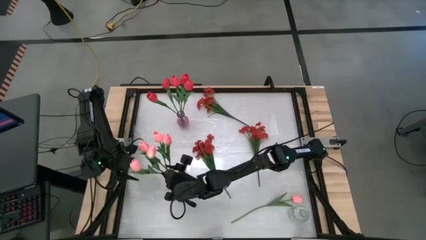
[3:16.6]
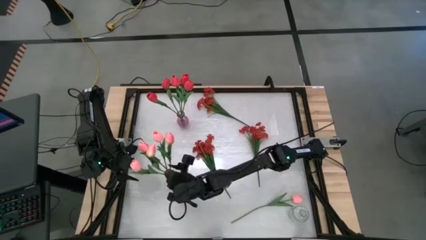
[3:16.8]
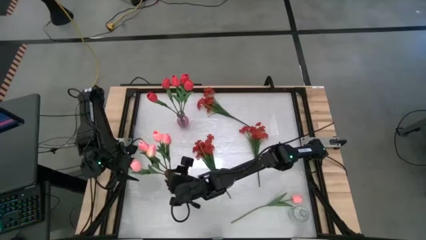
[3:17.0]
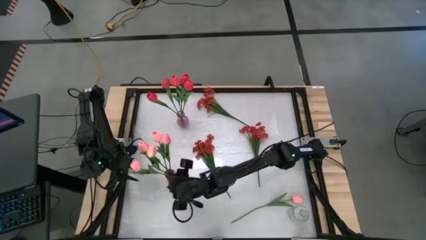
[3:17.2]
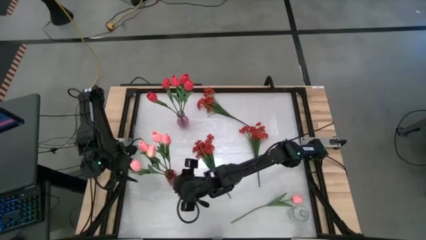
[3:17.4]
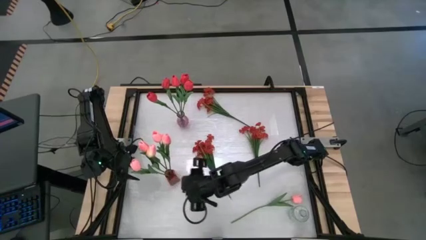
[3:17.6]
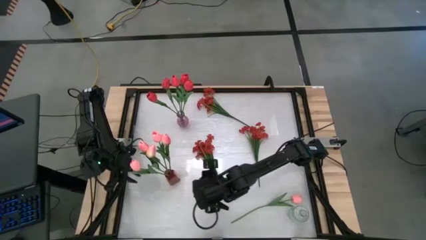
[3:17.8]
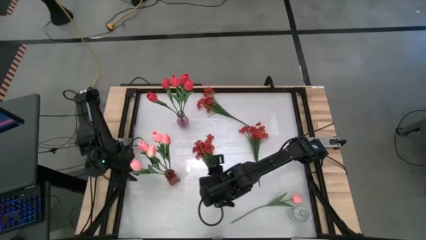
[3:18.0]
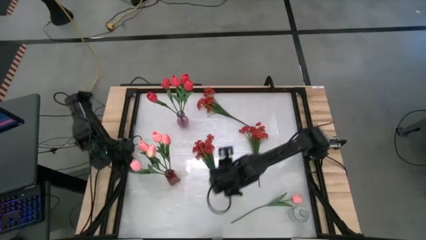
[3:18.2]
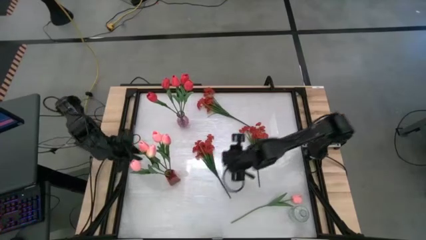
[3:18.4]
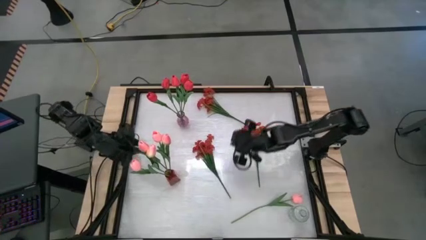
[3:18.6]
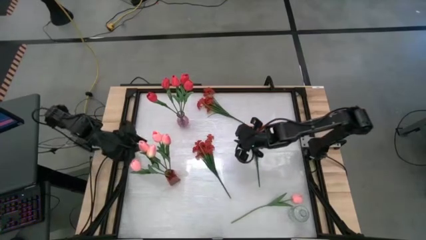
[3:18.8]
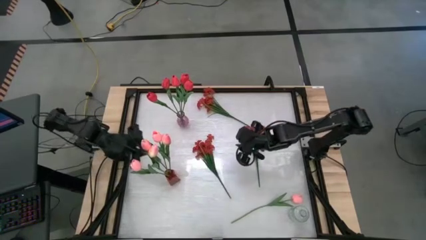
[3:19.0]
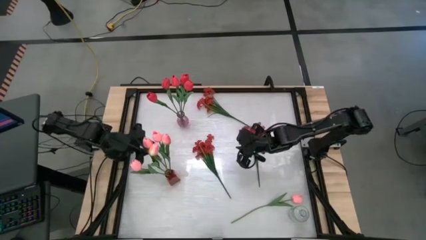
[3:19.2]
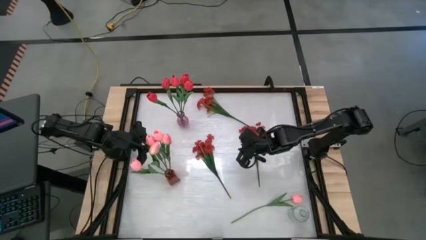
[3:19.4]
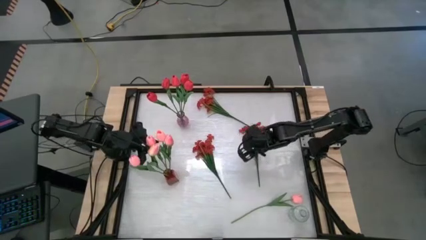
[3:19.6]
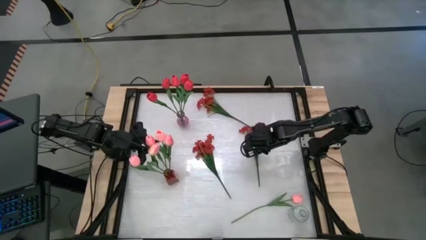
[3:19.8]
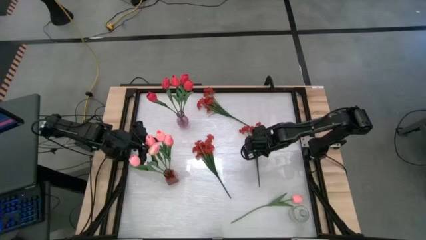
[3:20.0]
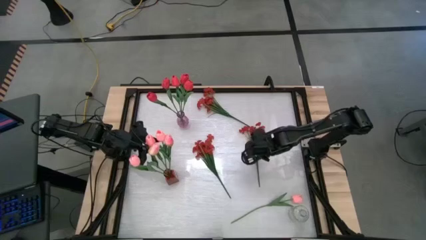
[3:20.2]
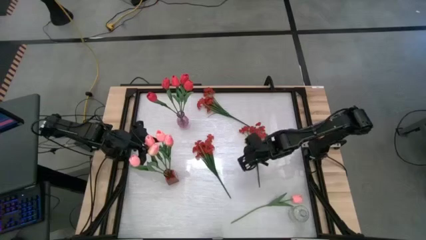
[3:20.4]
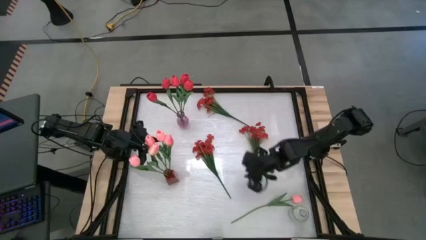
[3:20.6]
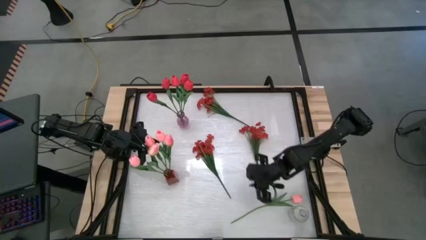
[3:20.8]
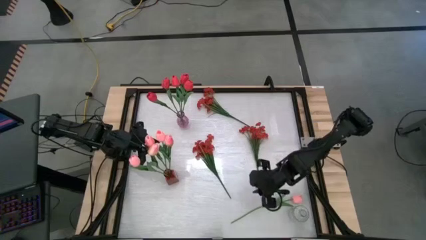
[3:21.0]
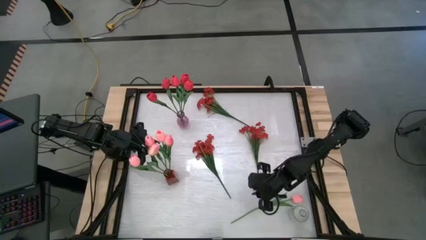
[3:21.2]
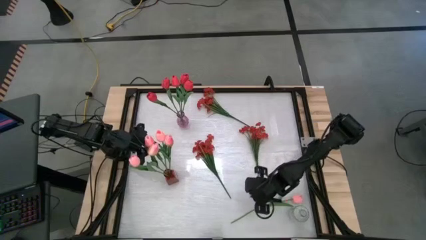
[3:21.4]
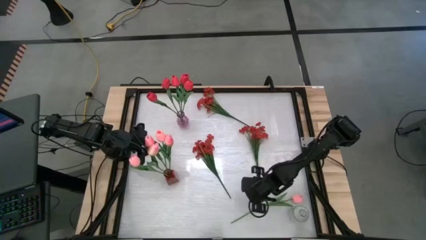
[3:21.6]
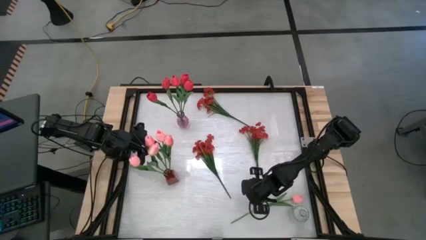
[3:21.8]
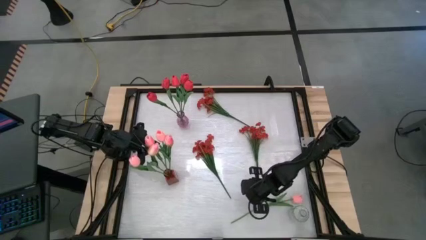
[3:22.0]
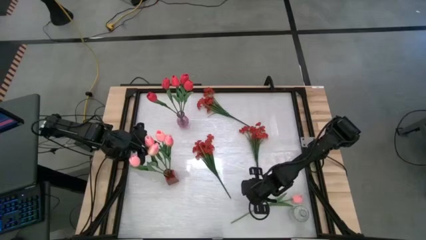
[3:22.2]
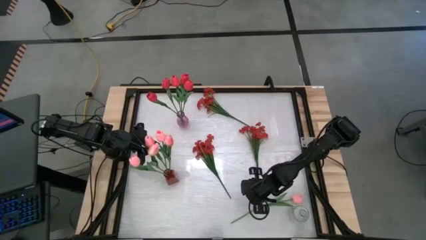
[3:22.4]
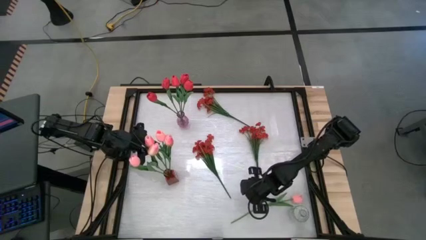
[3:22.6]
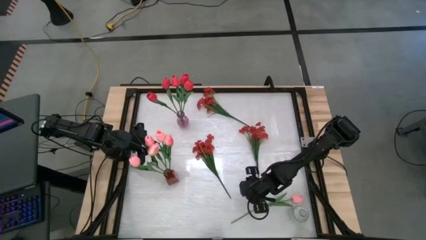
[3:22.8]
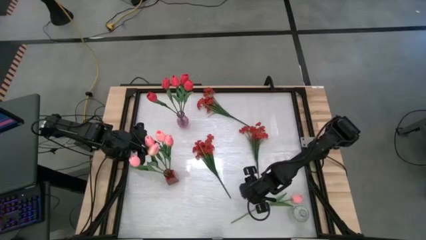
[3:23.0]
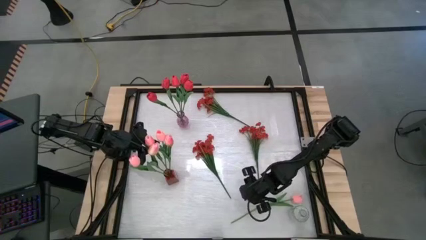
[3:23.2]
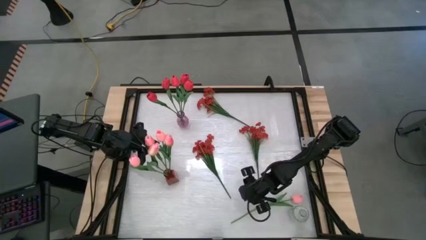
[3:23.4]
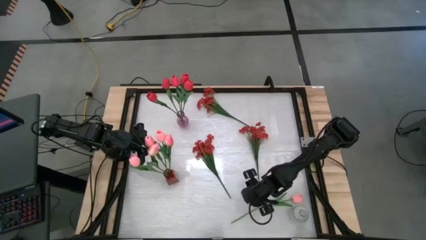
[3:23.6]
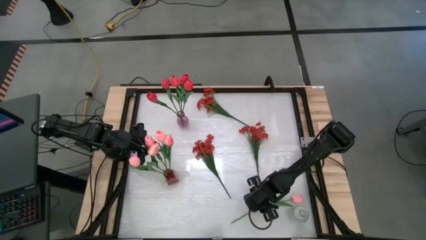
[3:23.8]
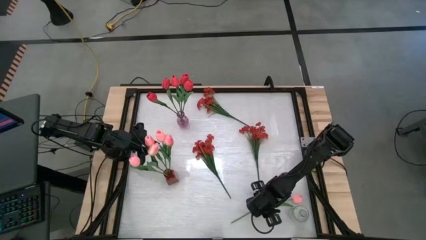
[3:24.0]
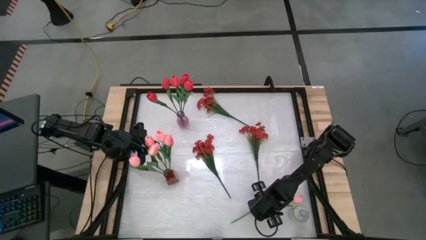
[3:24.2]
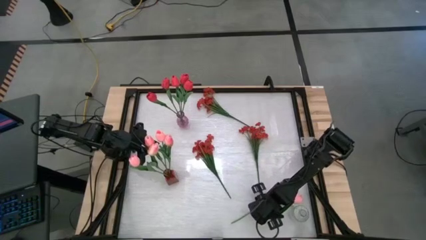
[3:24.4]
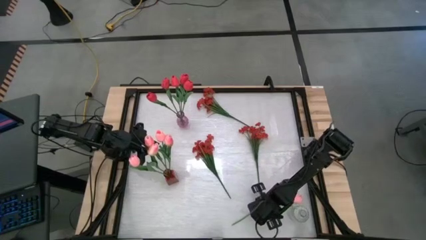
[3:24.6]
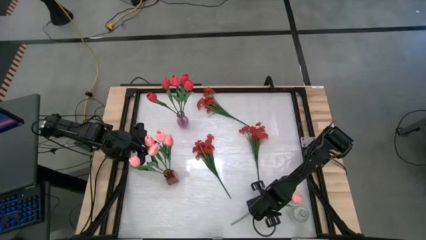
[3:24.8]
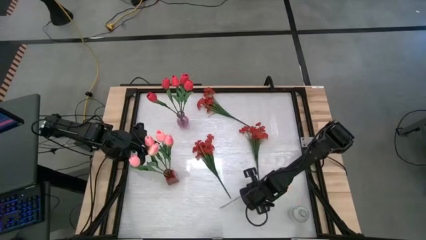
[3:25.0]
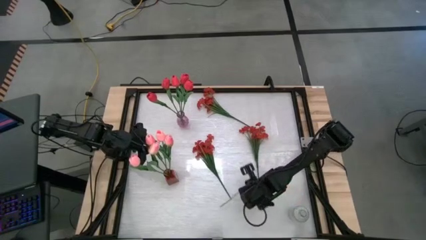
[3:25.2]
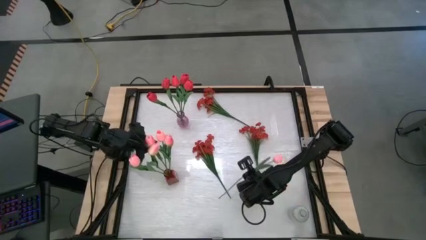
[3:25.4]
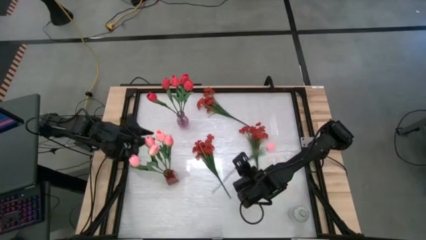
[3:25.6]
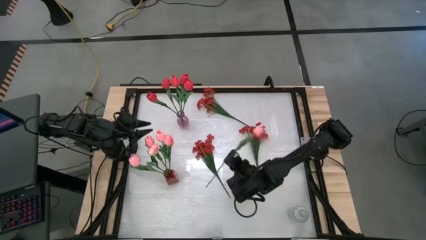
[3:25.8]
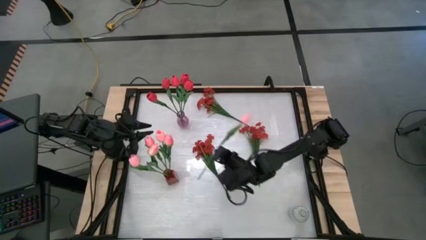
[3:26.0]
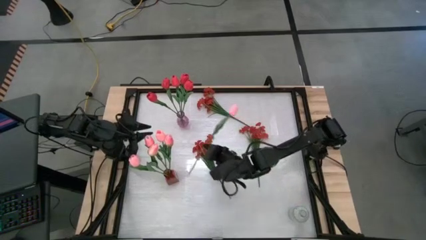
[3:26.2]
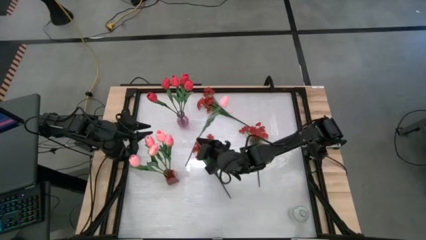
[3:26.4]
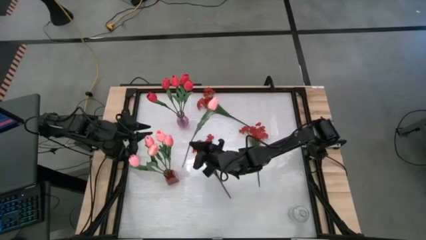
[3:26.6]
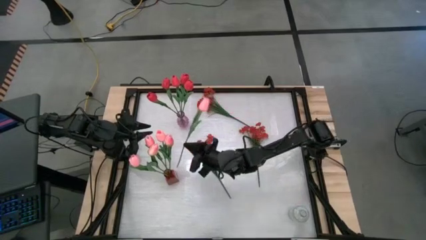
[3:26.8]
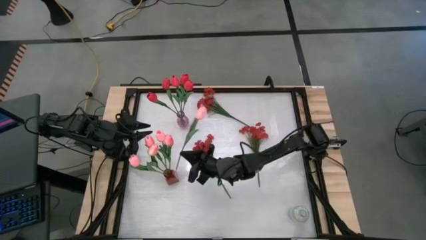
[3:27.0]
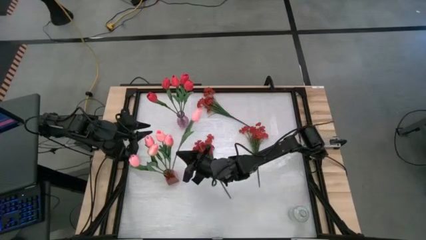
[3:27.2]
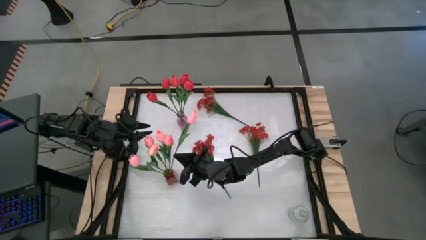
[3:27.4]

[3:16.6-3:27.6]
Task: Sort flowers into vase by color
Put the pink tulip into the red vase

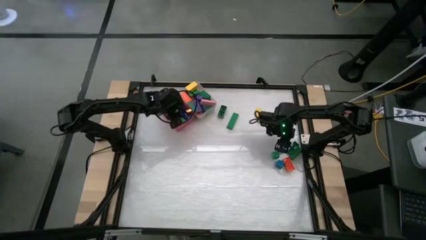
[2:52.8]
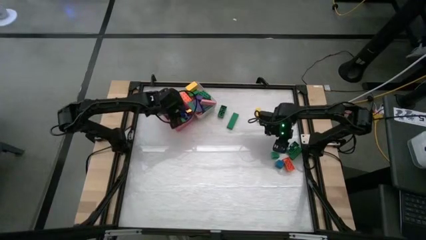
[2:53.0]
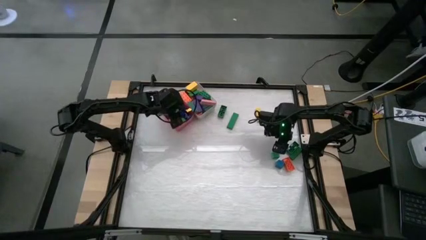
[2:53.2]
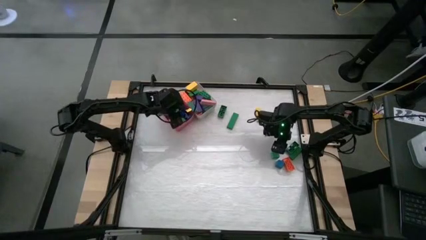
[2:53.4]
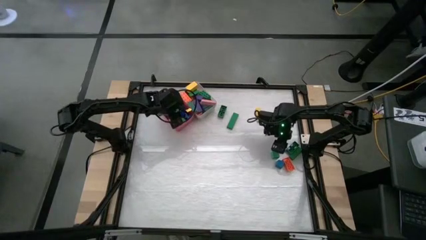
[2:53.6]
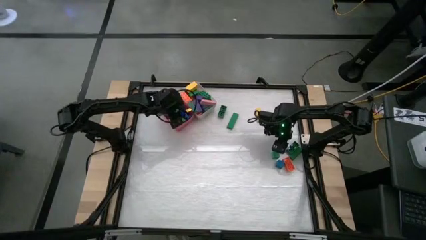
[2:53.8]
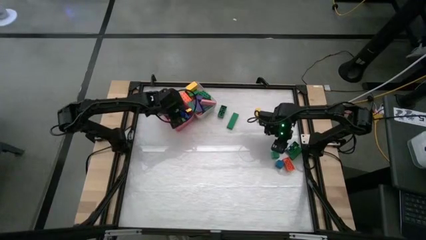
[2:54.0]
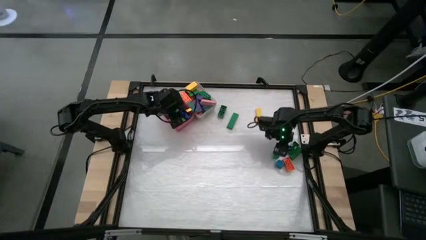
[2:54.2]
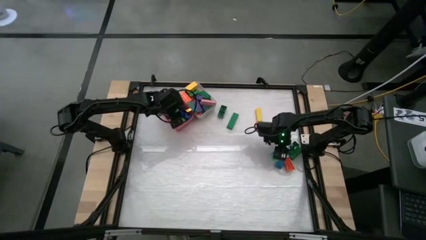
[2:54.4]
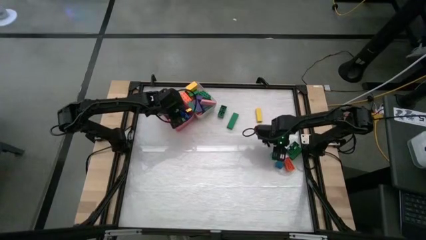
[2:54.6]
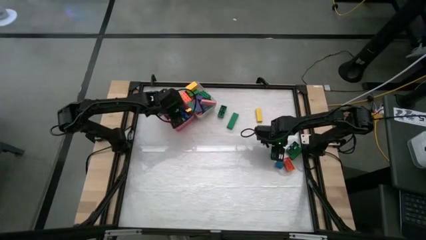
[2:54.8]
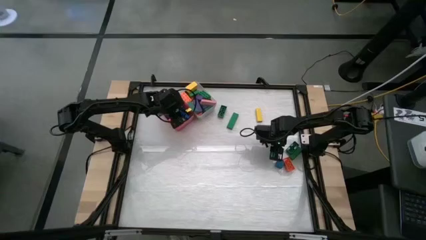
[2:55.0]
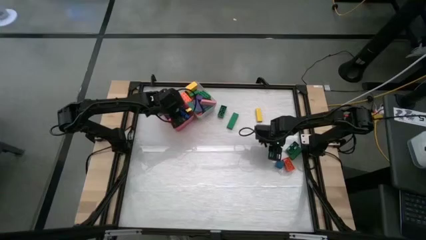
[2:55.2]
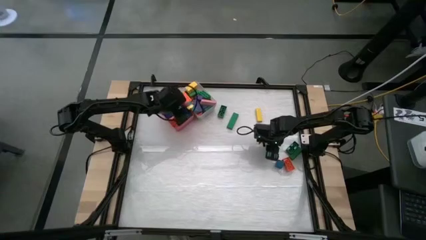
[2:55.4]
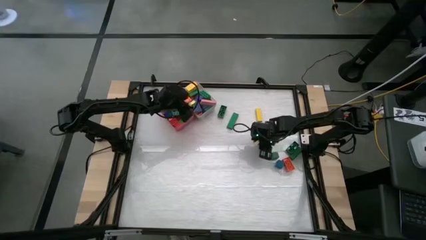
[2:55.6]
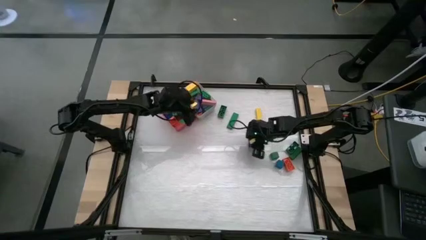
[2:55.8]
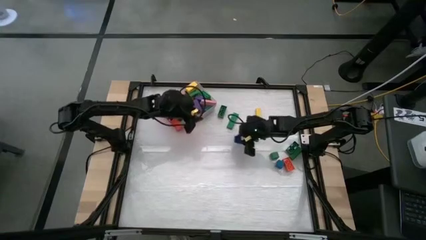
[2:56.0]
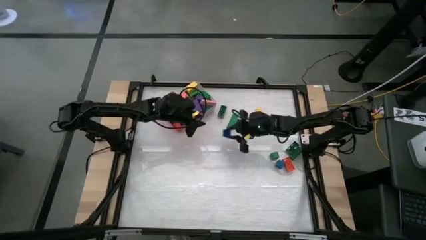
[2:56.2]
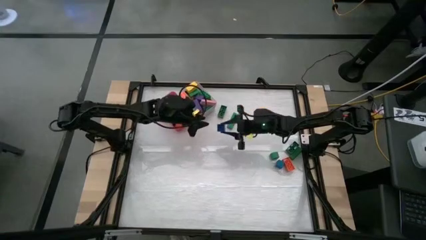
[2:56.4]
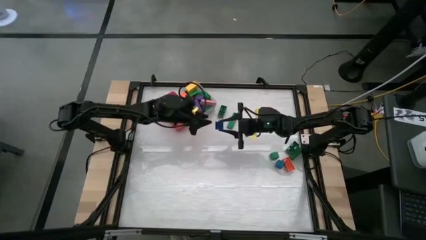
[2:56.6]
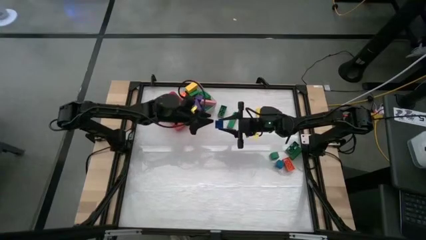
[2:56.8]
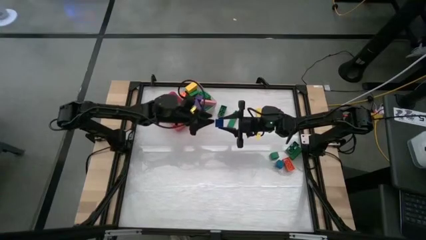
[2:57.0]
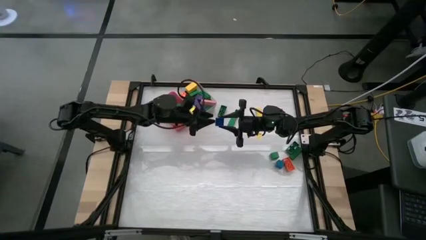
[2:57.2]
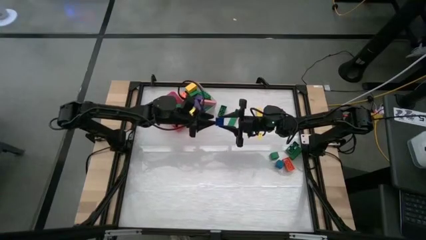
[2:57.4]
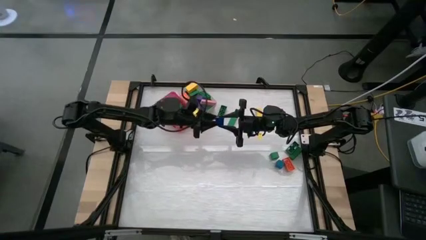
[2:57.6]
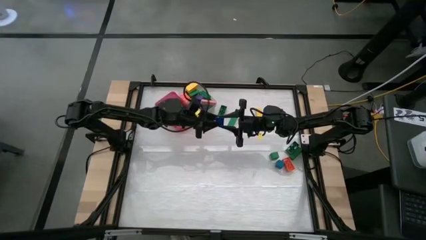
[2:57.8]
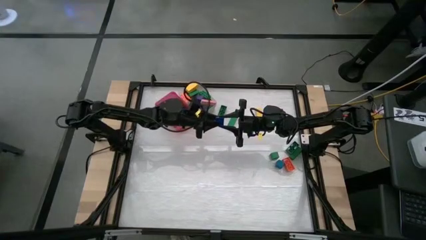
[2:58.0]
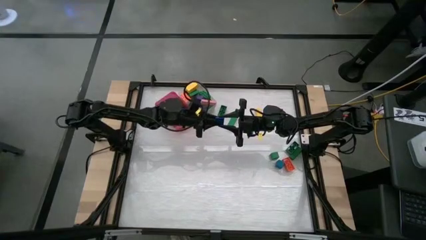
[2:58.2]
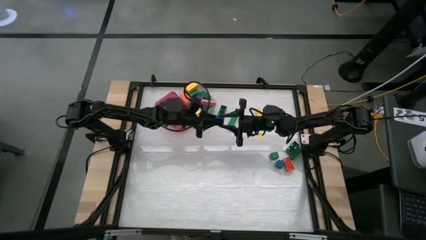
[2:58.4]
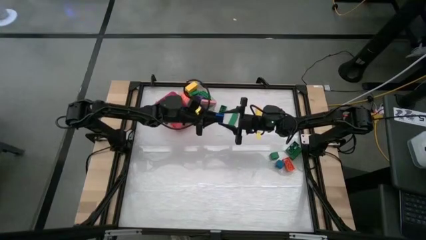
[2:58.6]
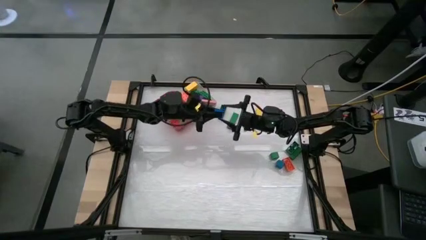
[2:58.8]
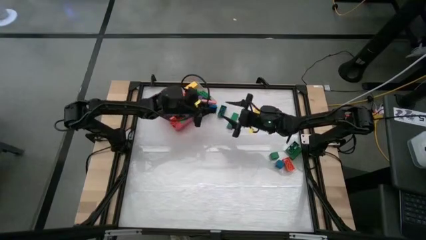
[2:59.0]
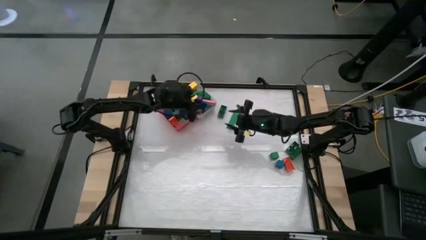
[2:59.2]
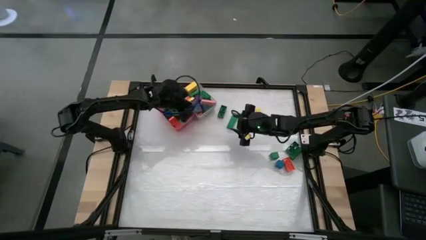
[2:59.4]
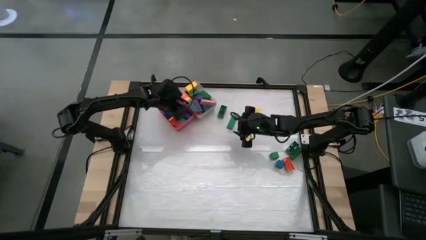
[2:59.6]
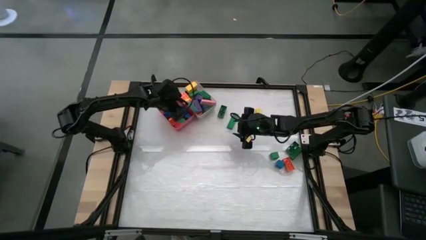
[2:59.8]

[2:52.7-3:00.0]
Task: Sort blocks by size
Put the small blue game piece into the pink bin
